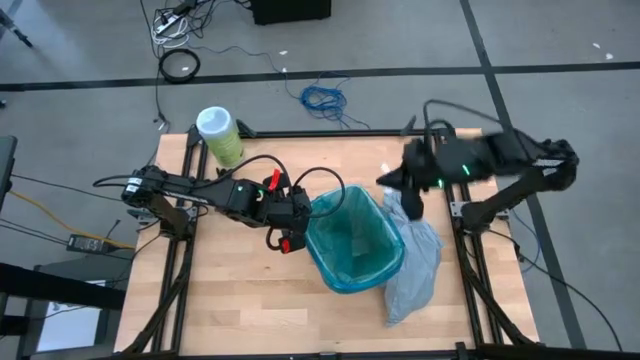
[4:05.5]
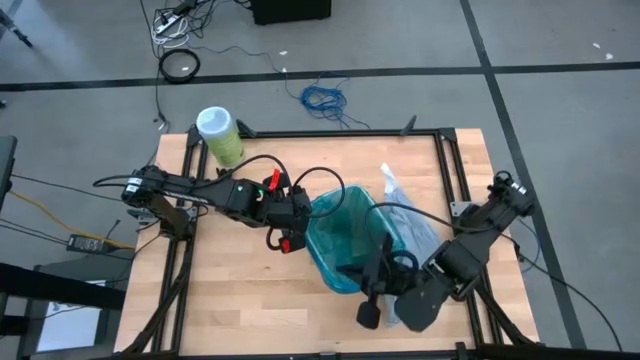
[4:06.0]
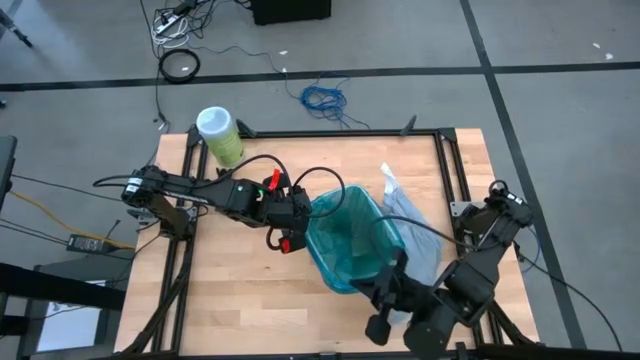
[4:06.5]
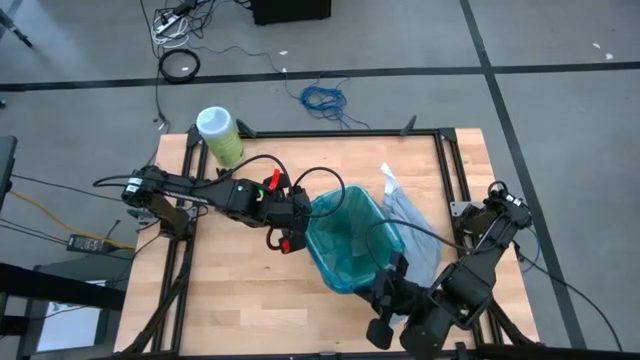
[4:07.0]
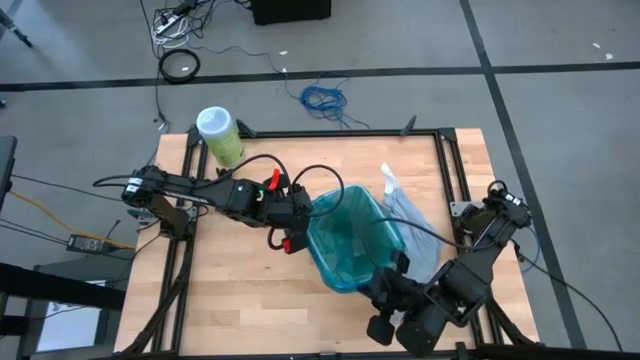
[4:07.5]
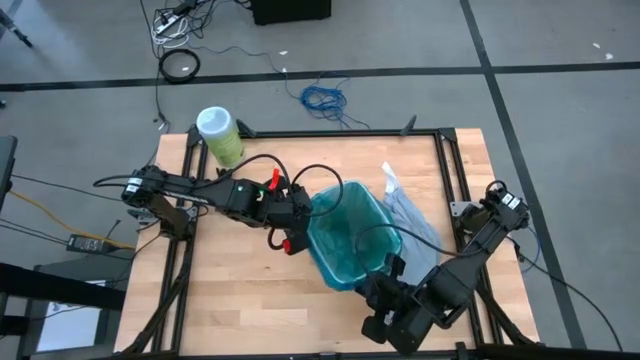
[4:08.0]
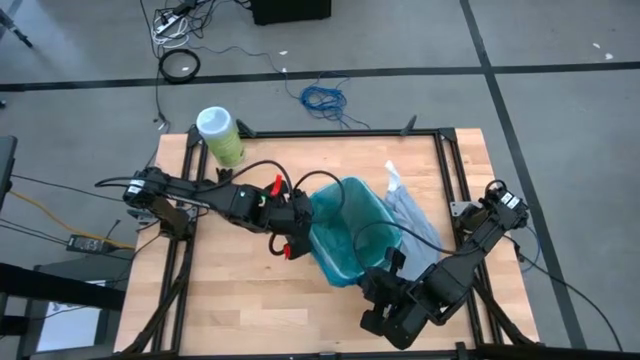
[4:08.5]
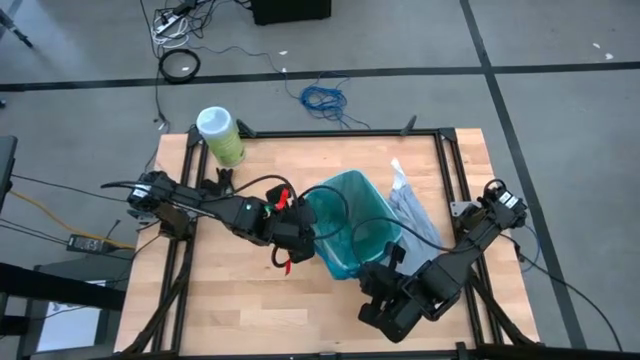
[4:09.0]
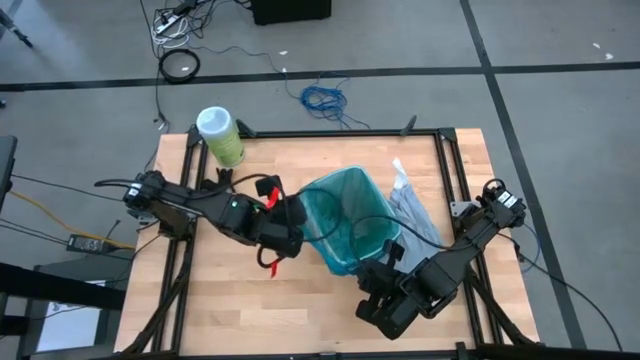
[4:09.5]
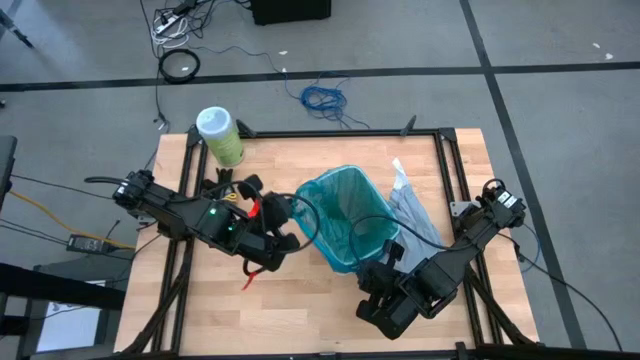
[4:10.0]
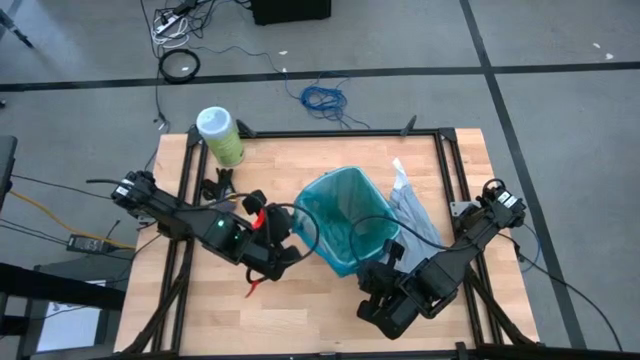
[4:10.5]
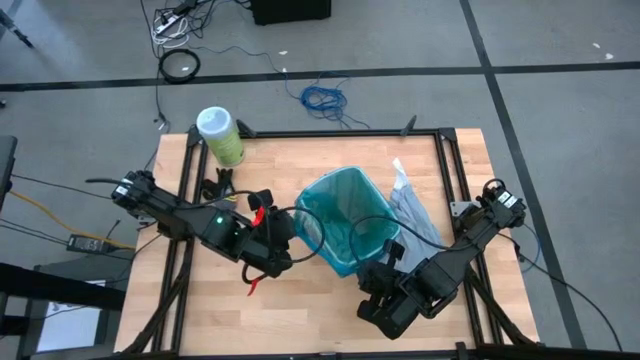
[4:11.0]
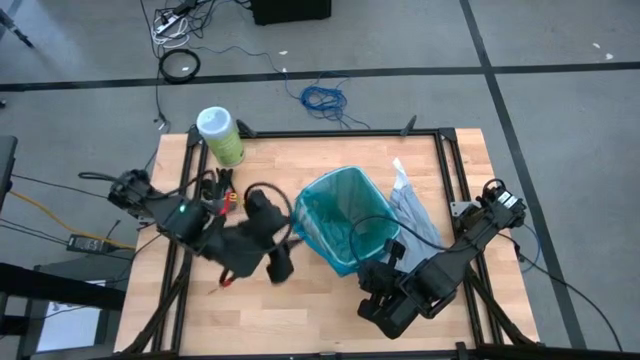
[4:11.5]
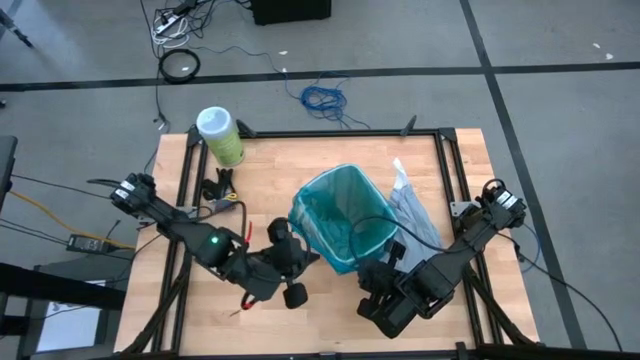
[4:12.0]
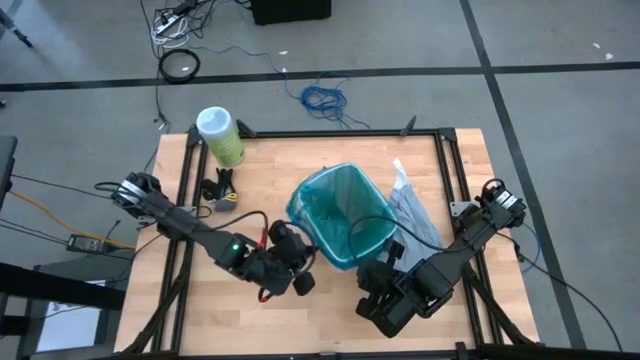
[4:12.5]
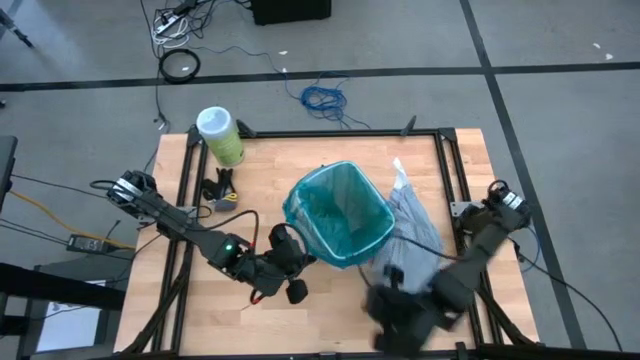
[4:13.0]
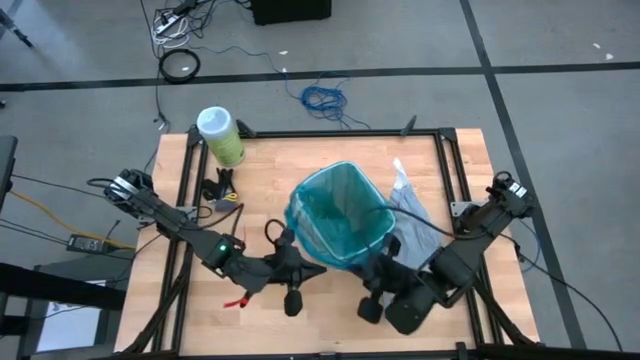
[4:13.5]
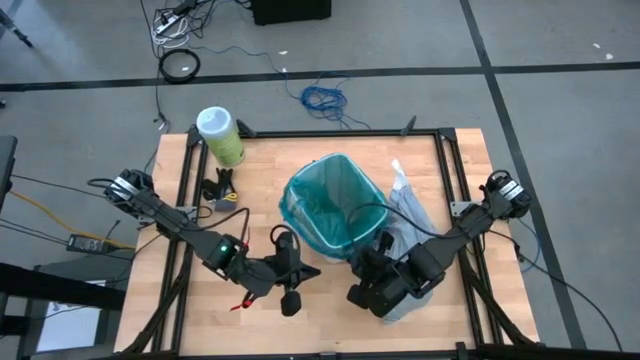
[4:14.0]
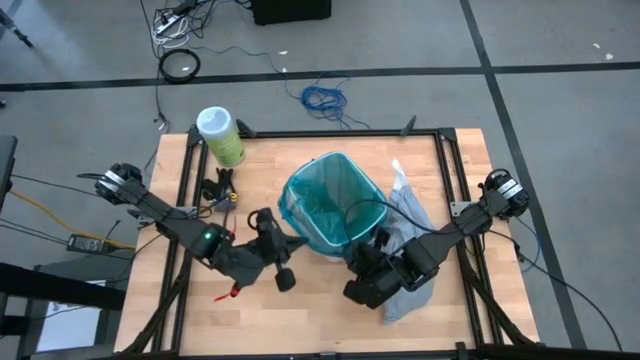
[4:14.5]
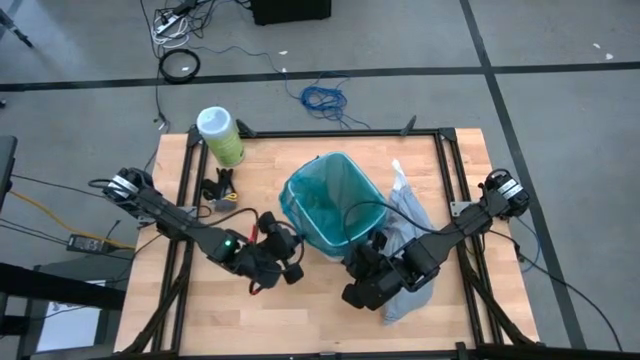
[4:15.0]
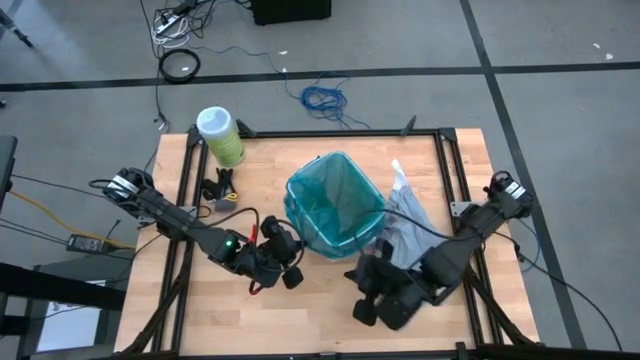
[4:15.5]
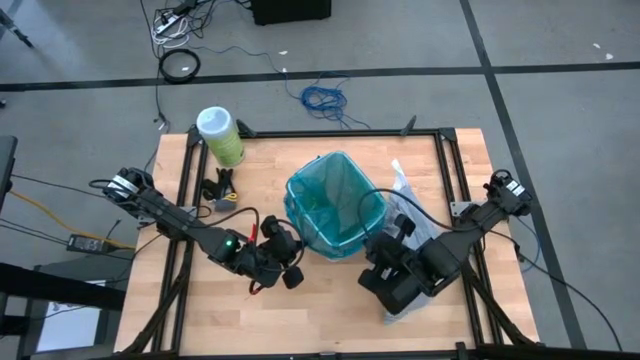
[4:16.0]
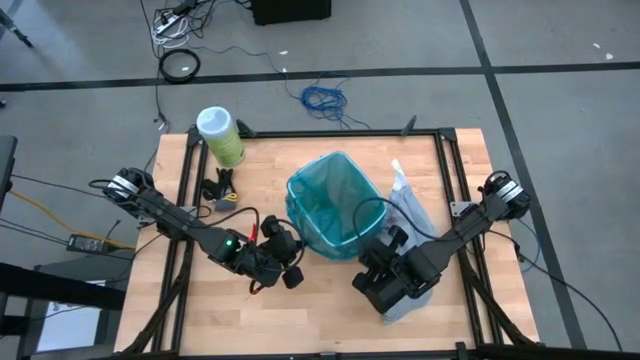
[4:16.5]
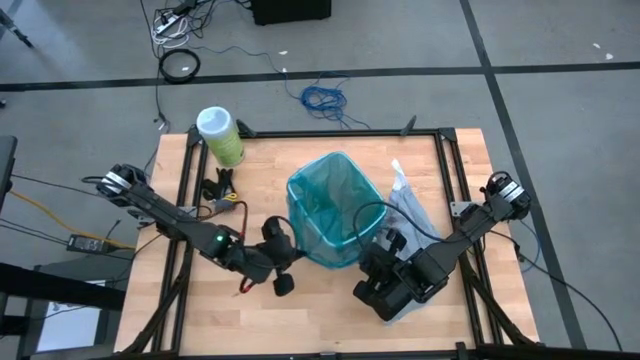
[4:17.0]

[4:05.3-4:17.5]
Task: place trash/remove bag and relplace
Put the new blue trash bag into the trash bin

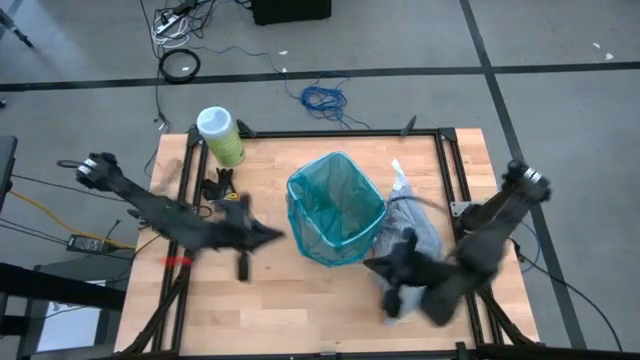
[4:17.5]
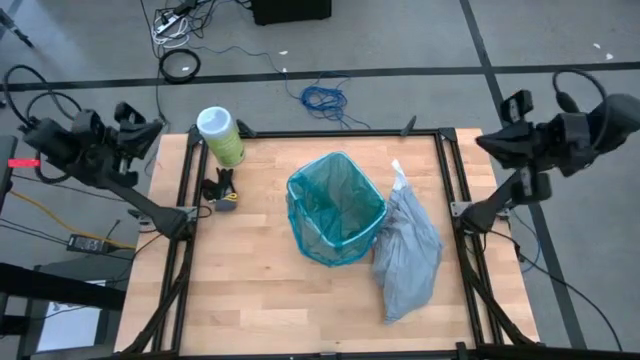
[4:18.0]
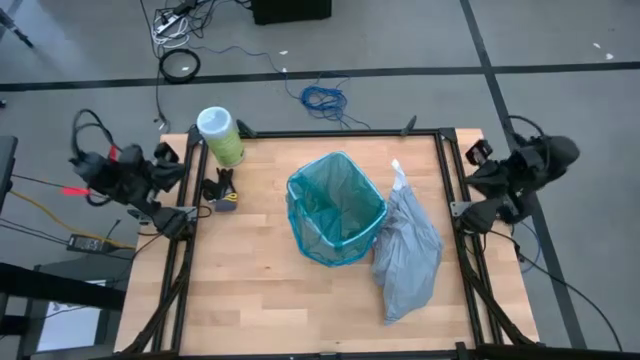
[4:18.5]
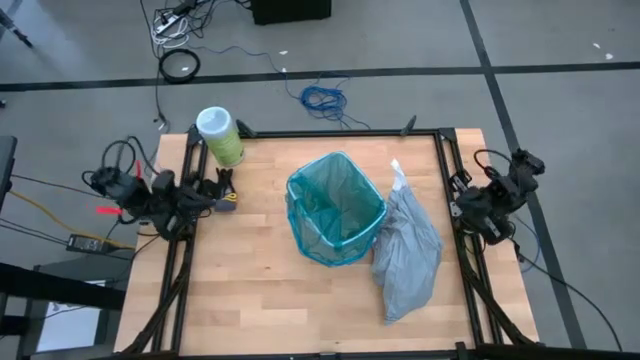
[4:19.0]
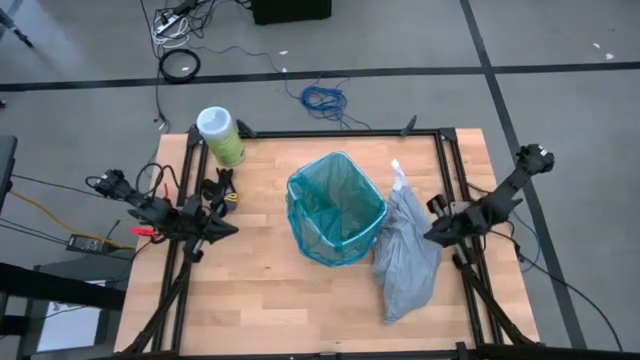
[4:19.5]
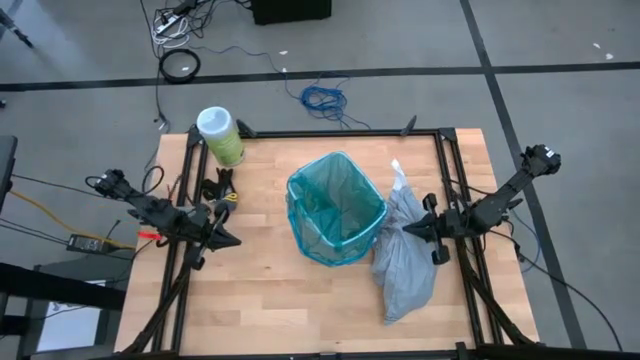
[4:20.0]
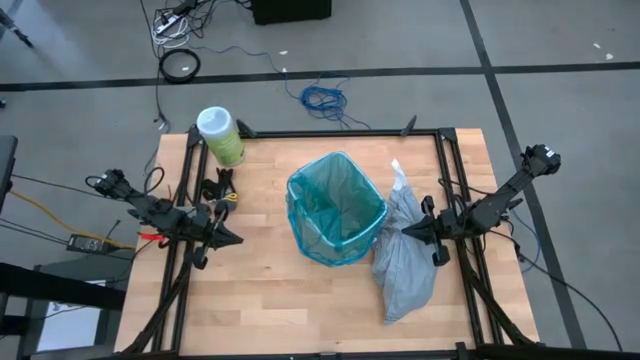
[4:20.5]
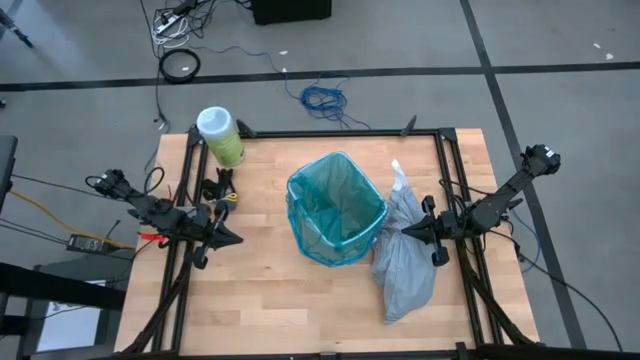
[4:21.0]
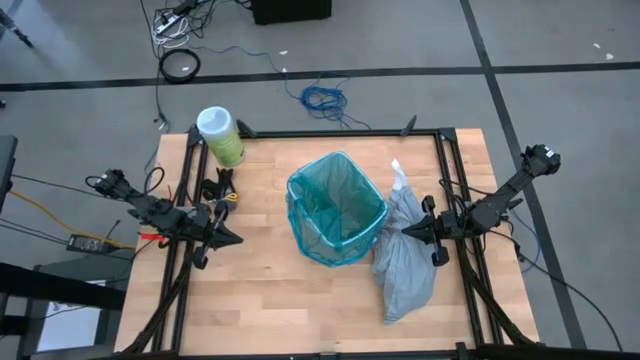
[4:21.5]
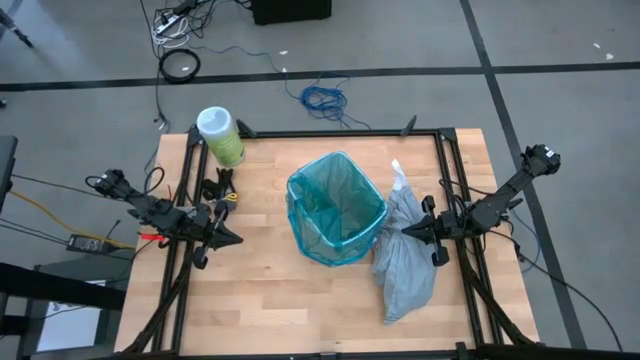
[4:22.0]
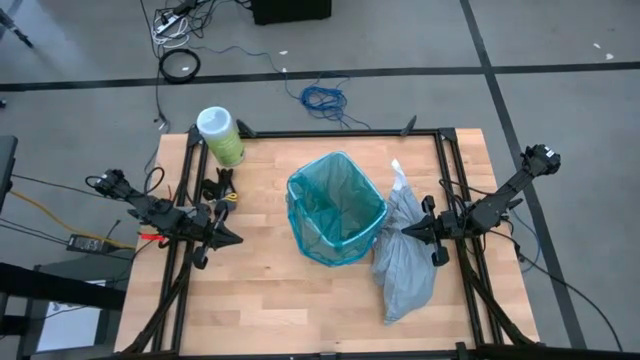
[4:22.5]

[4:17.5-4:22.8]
Return to Home Position
